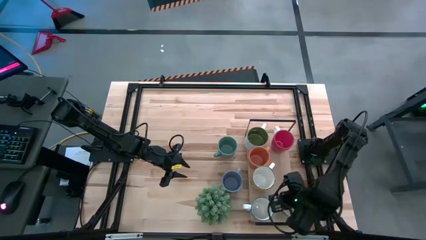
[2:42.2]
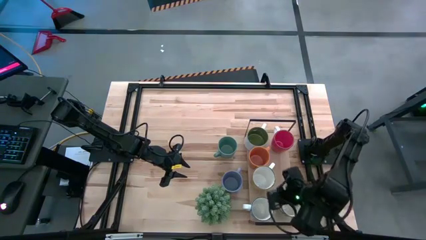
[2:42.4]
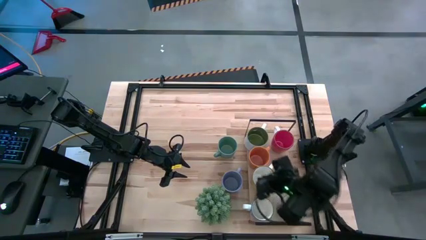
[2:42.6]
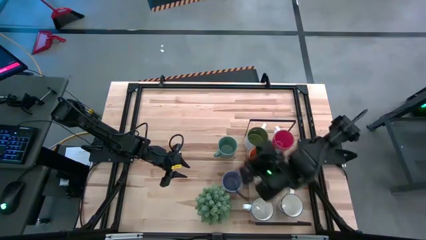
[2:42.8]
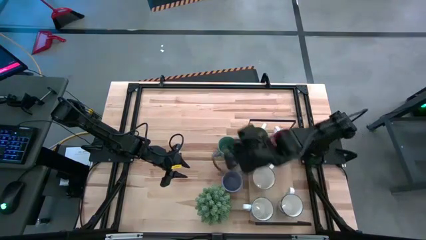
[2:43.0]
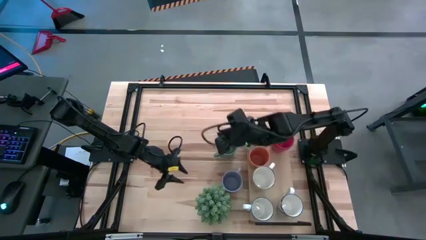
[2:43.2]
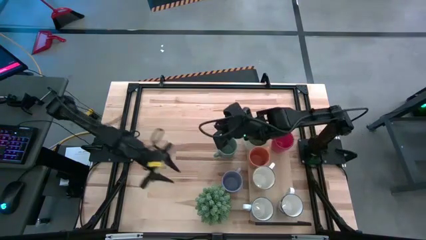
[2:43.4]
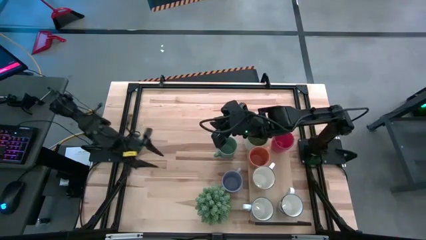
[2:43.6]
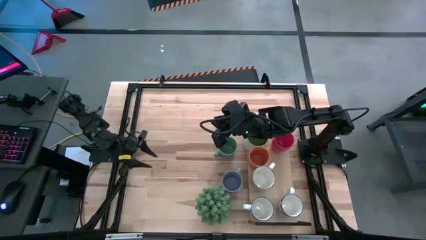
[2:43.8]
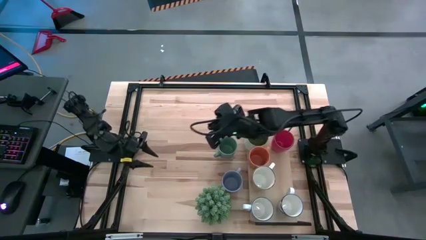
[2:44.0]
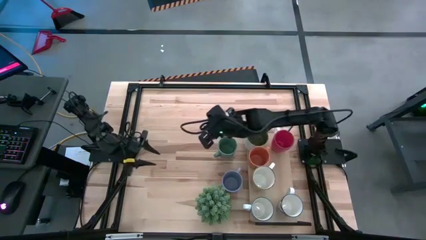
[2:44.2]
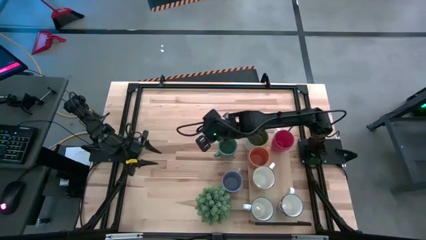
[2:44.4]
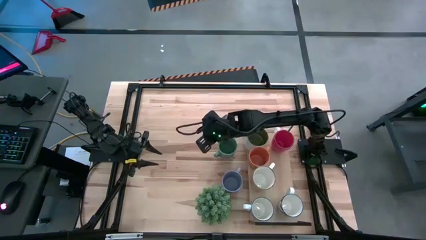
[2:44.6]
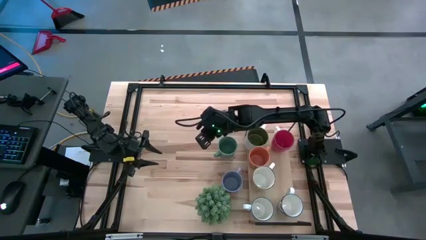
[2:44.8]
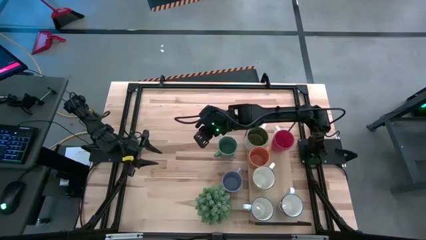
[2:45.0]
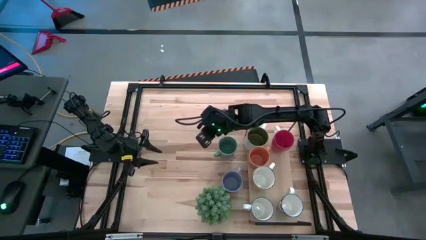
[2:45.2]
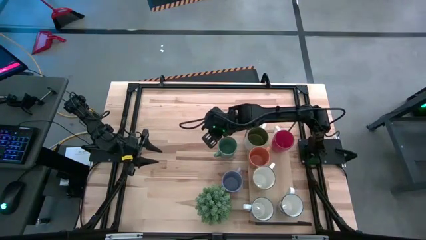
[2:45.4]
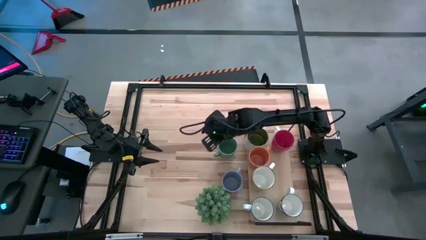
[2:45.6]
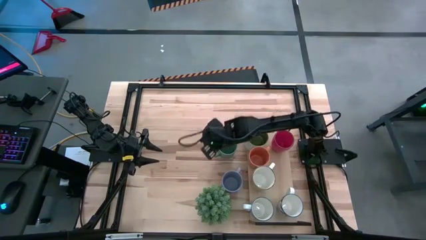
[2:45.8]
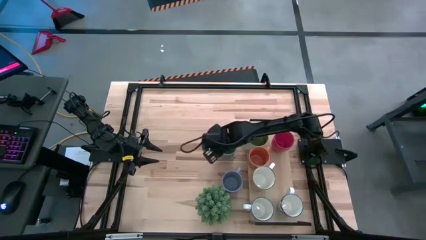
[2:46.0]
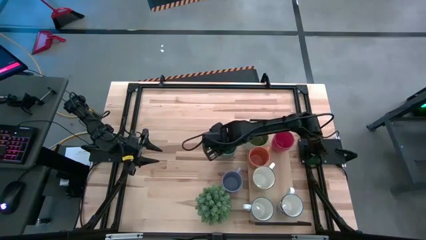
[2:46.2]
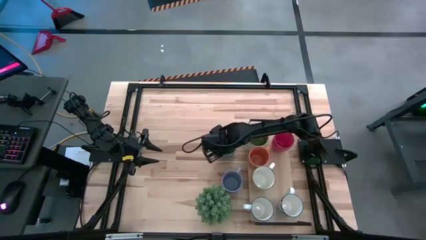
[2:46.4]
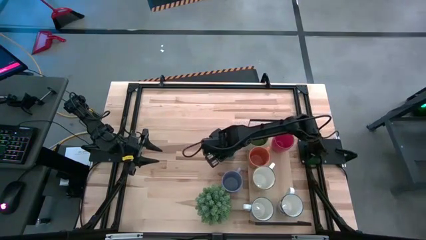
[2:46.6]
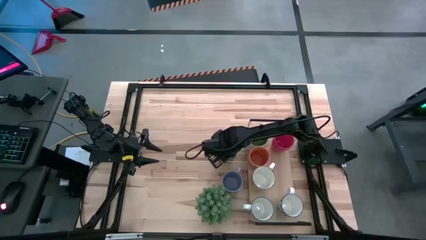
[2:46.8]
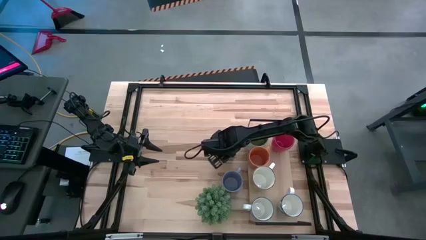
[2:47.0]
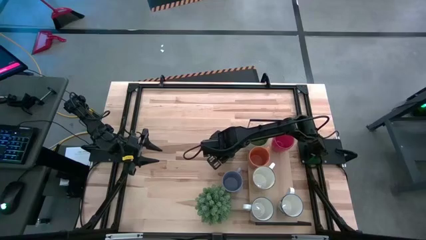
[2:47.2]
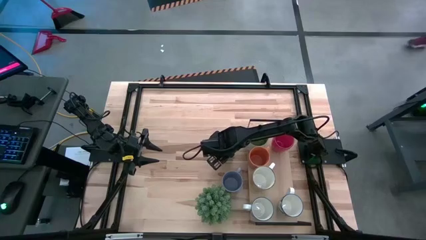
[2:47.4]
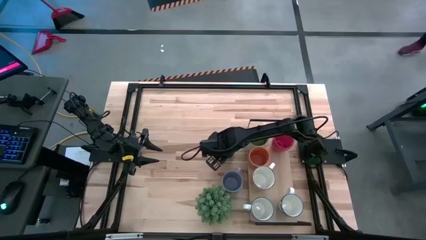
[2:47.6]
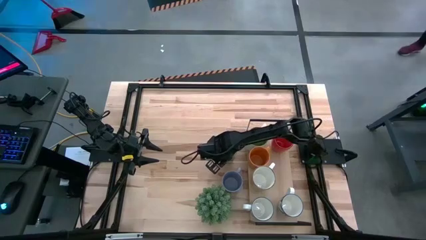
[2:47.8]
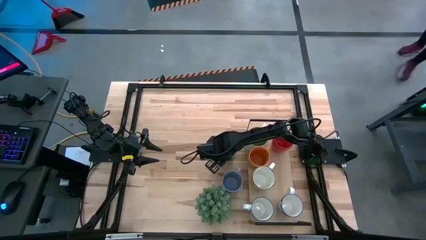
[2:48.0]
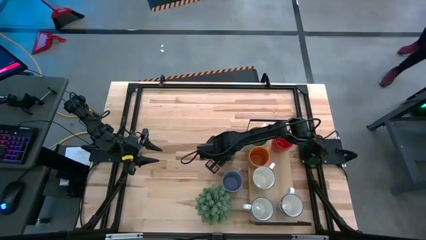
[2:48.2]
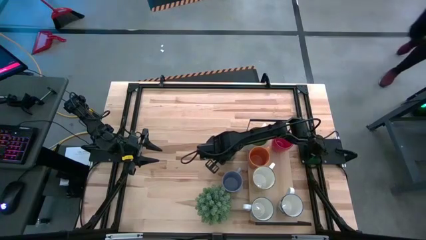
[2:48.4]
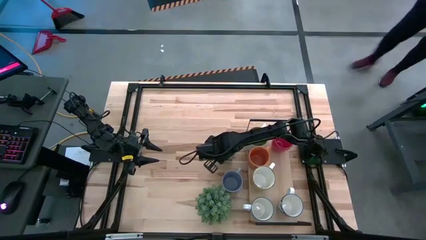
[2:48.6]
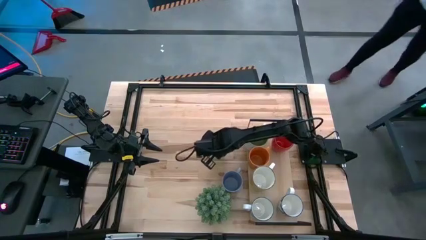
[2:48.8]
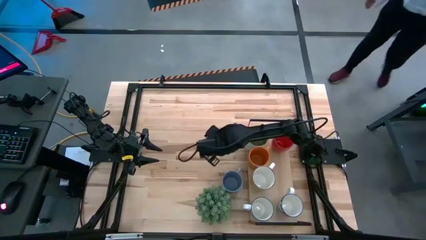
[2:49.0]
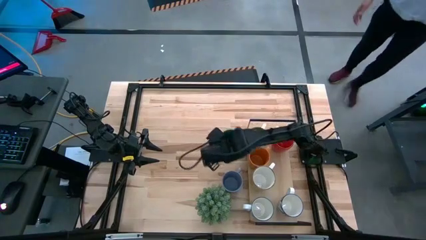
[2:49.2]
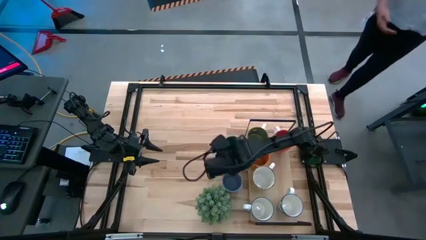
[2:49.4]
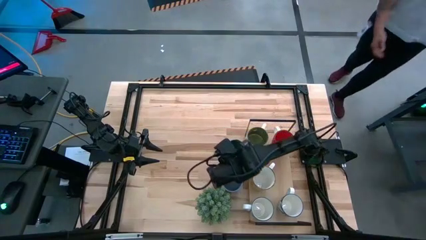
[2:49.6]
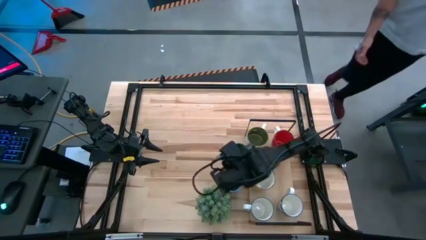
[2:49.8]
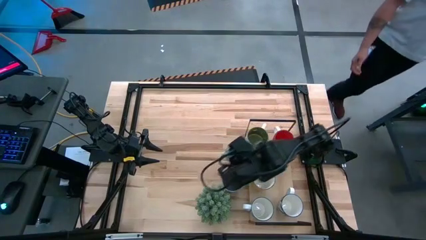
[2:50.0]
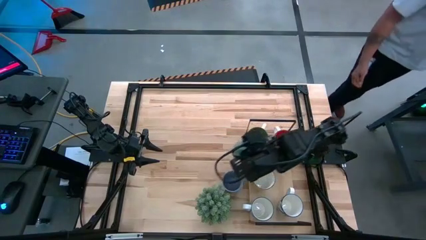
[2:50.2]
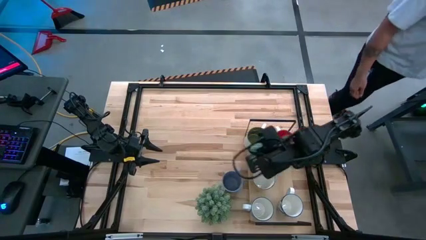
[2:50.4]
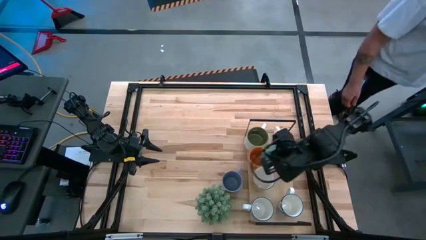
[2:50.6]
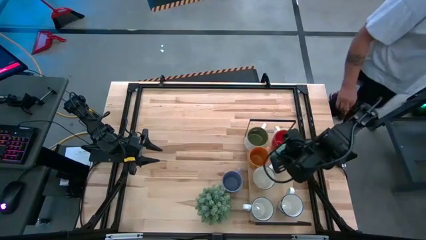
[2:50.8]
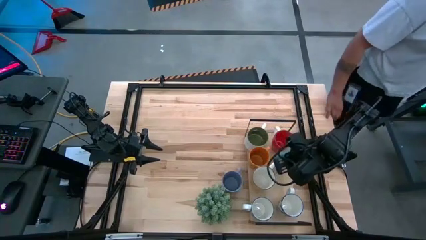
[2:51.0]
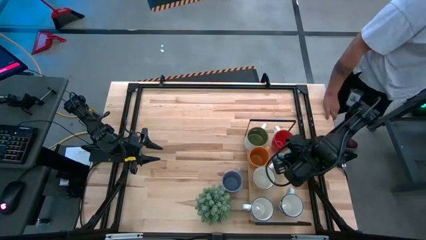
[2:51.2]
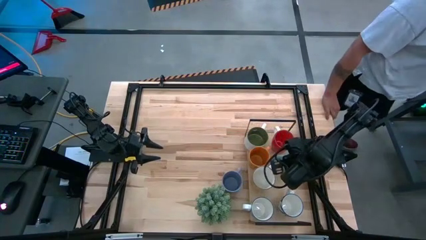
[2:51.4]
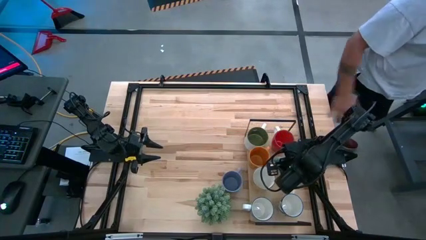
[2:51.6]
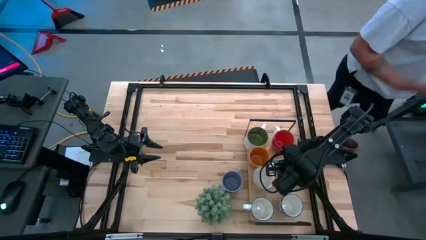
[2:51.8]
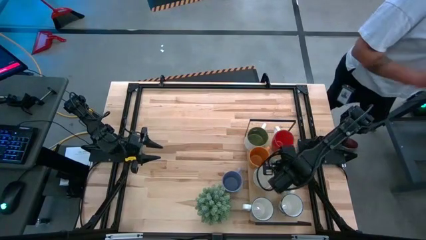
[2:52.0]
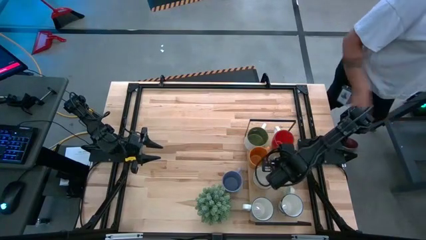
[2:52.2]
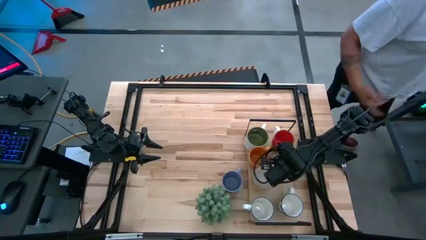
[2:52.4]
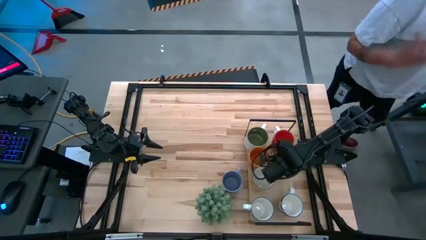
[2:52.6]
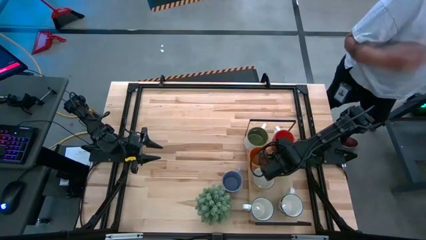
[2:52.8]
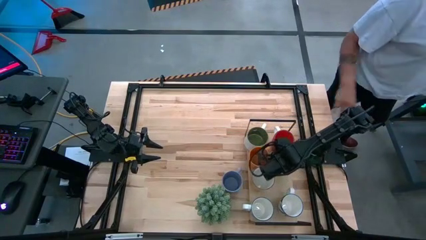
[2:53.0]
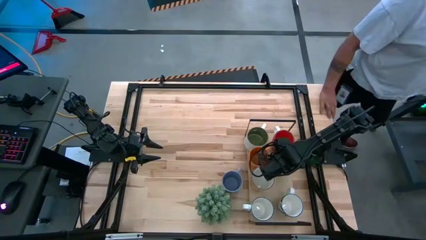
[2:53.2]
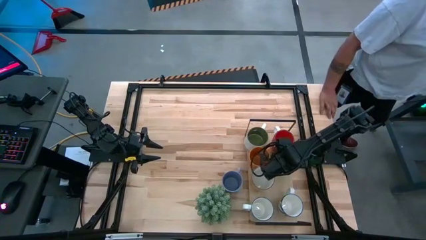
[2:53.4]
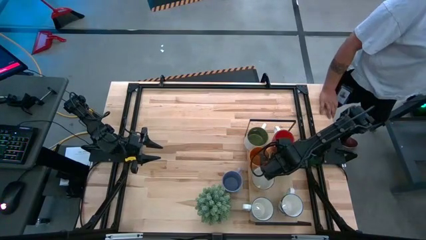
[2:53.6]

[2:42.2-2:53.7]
Task: Place coffee mugs
Put the green mug on the shelf

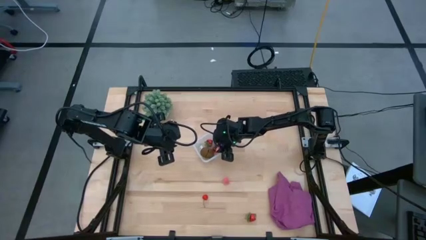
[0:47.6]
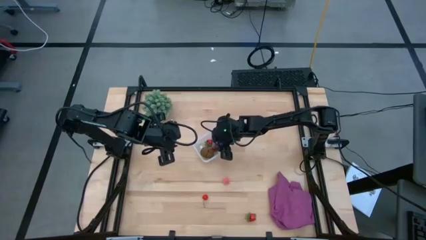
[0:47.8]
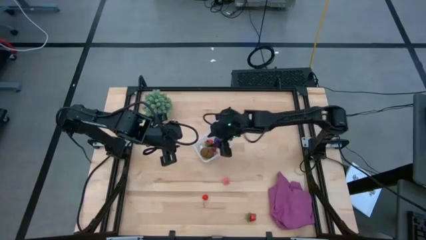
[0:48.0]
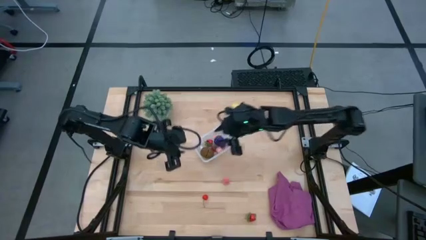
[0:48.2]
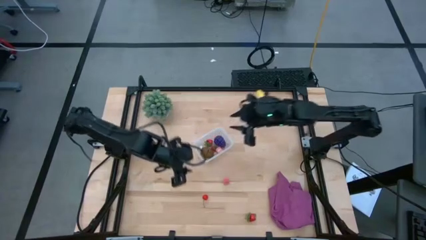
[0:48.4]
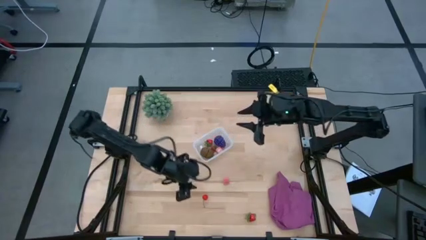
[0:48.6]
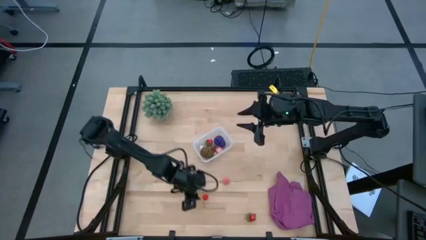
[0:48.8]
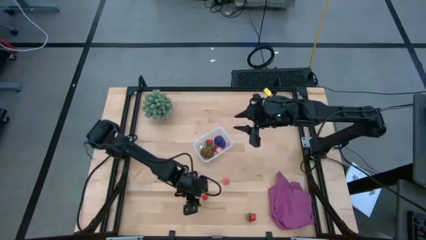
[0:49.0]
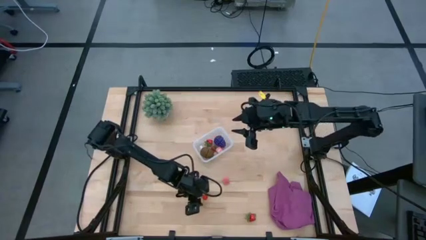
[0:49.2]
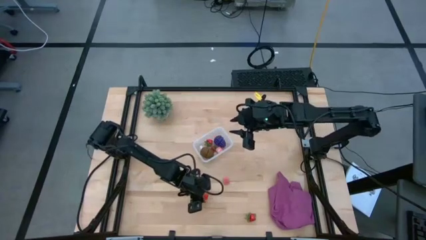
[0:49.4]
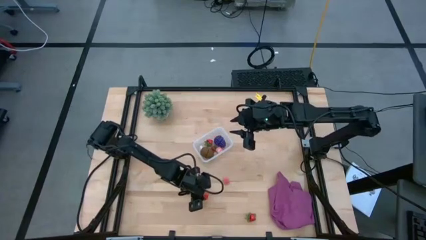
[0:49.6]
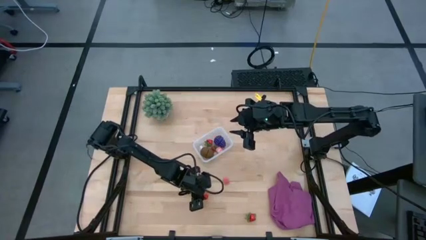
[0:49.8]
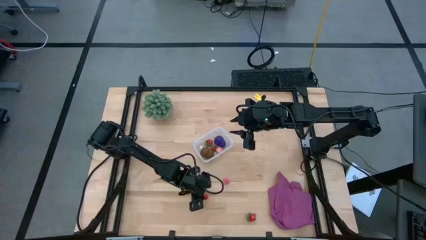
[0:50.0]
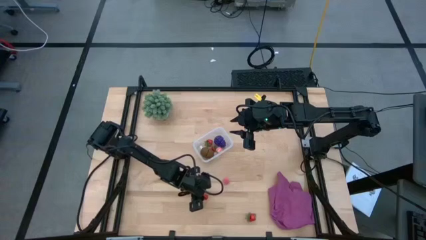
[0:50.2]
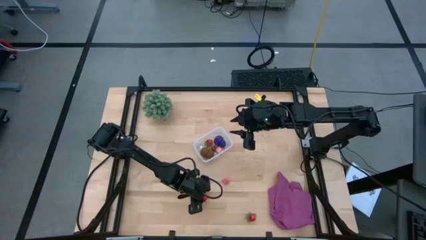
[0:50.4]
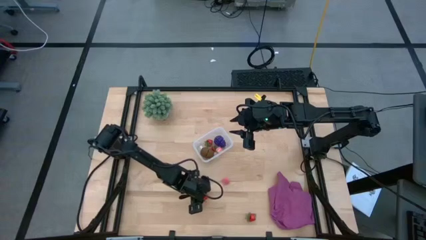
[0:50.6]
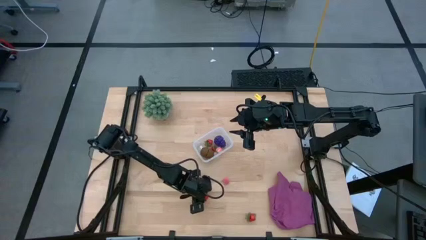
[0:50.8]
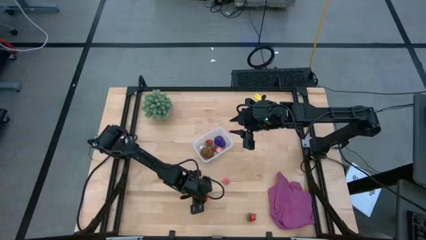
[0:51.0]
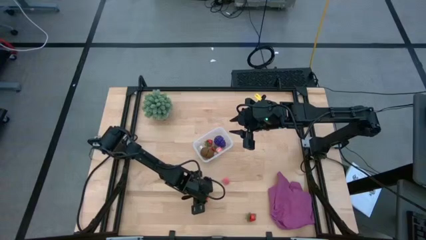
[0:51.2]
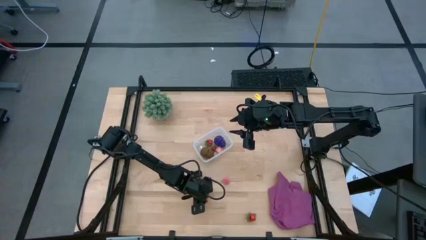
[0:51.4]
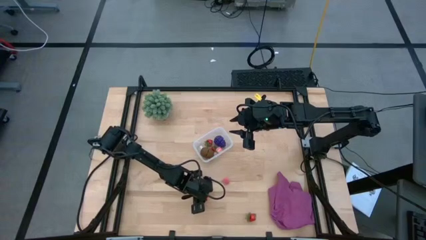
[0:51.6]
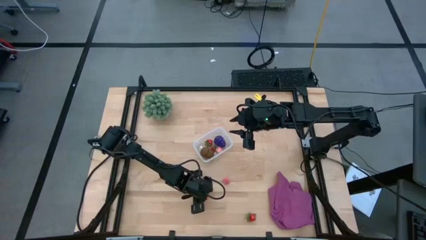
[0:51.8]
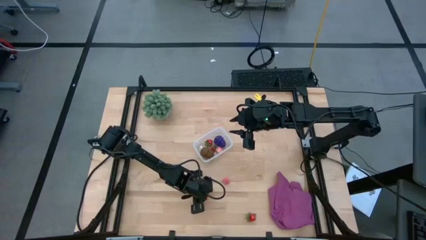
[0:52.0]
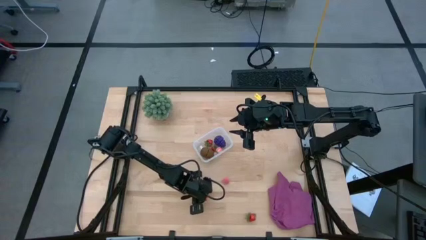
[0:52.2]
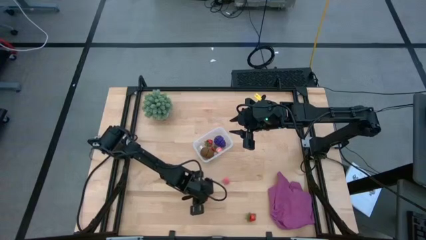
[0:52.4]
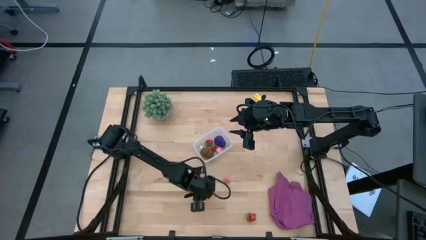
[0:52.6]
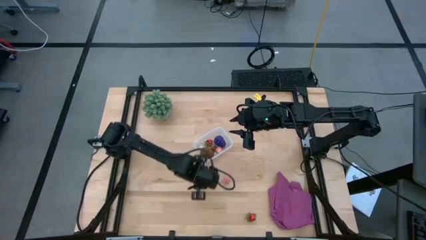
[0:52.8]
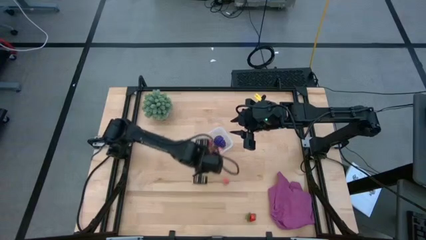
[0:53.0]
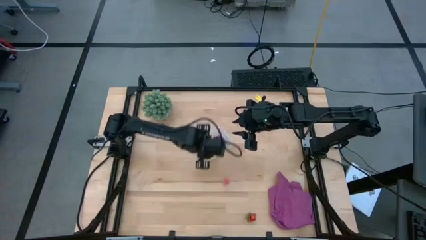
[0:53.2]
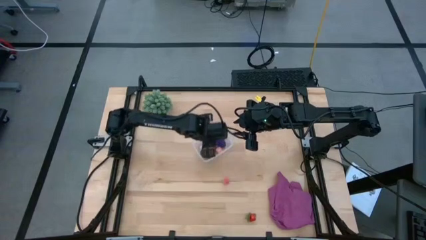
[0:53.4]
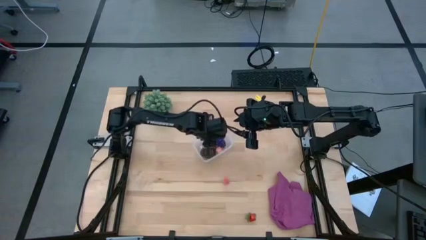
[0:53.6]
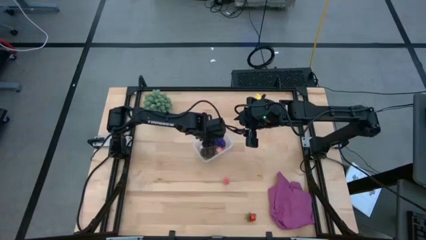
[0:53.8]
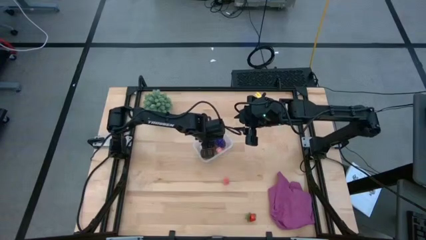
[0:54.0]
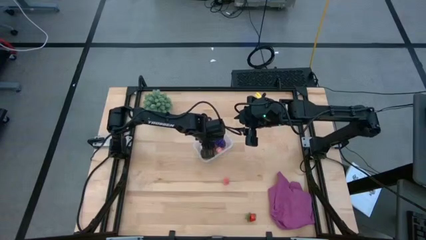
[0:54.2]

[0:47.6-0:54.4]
Task: Pick and placing Produce into tupperware
Put the cherry into the transparent bin
